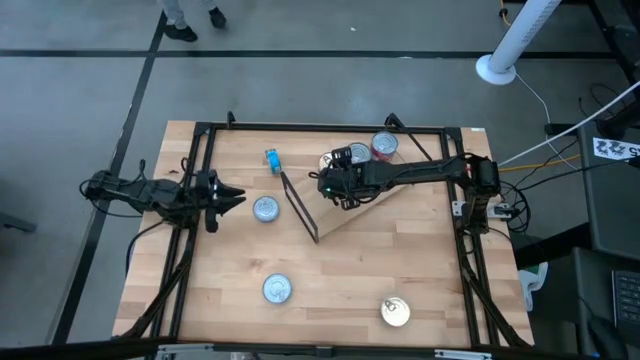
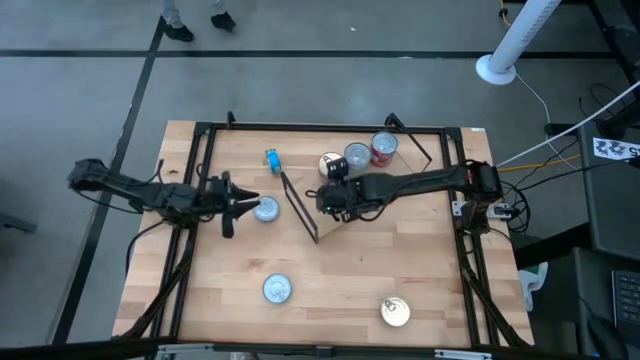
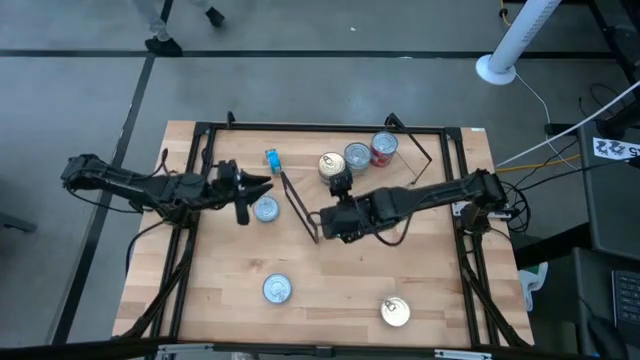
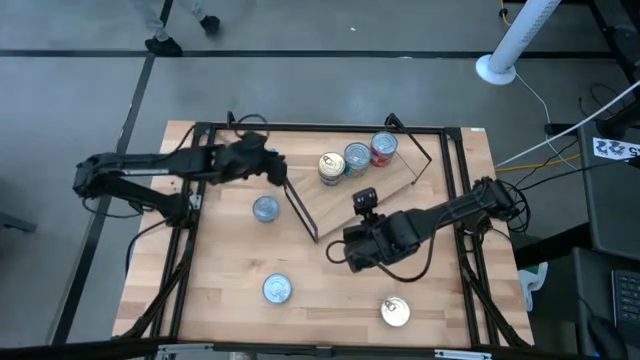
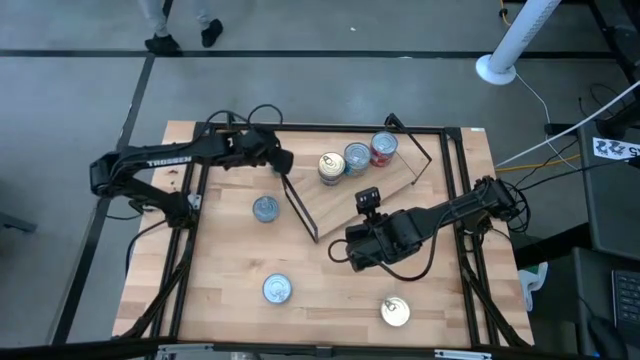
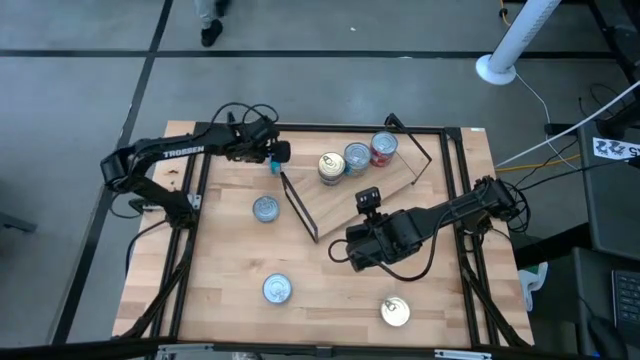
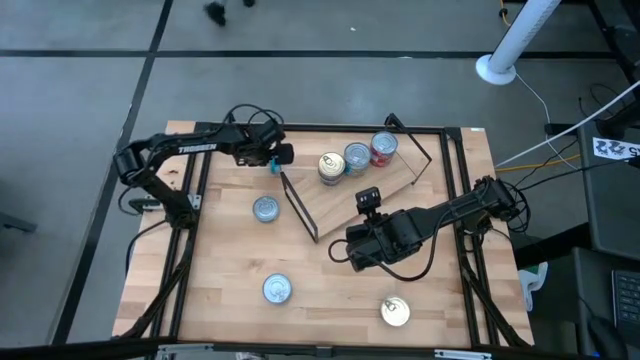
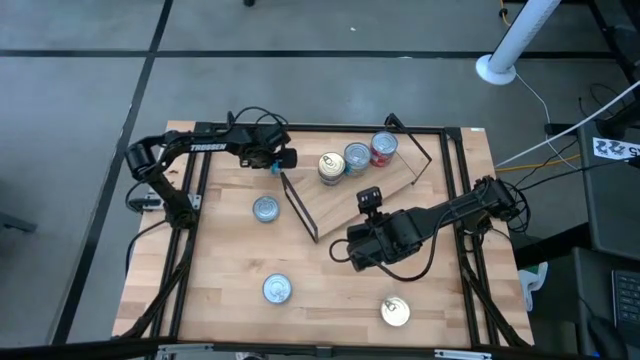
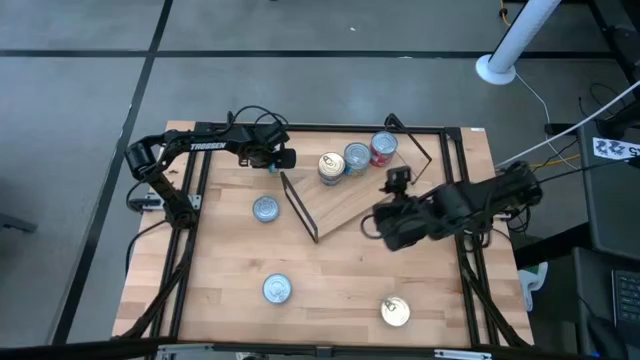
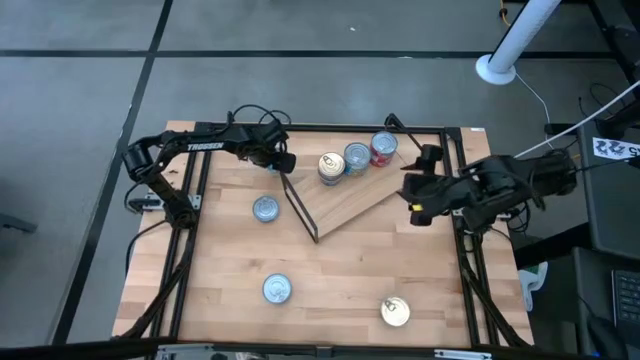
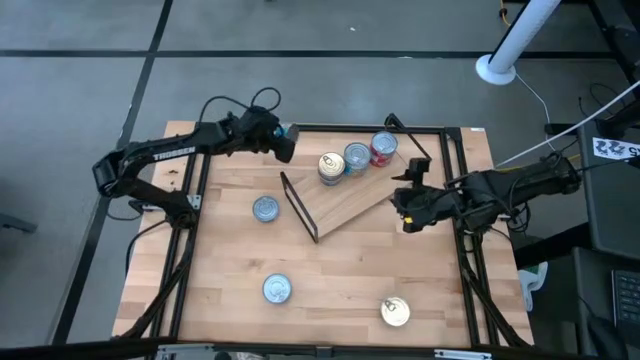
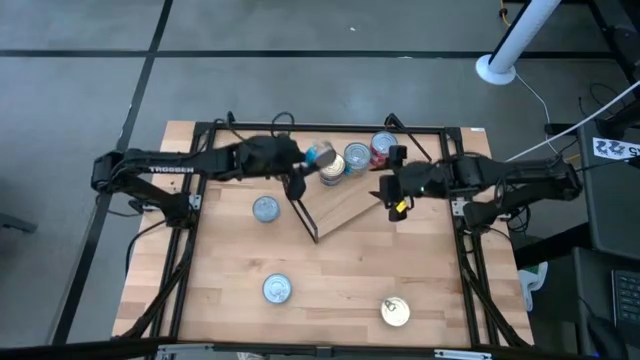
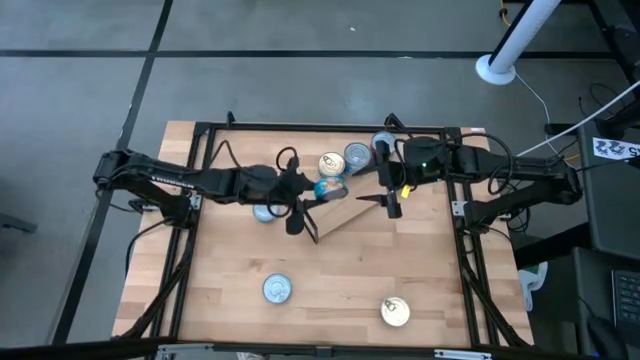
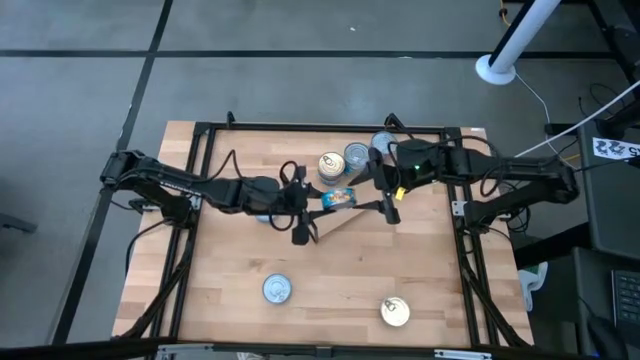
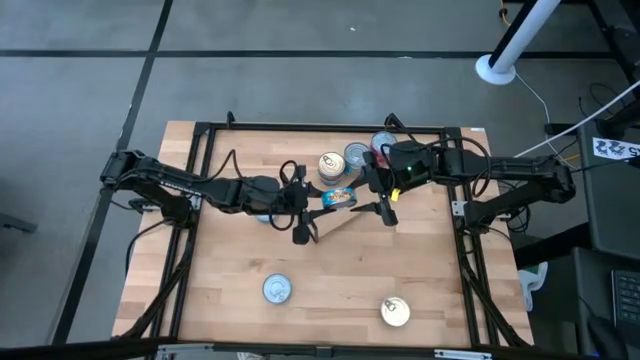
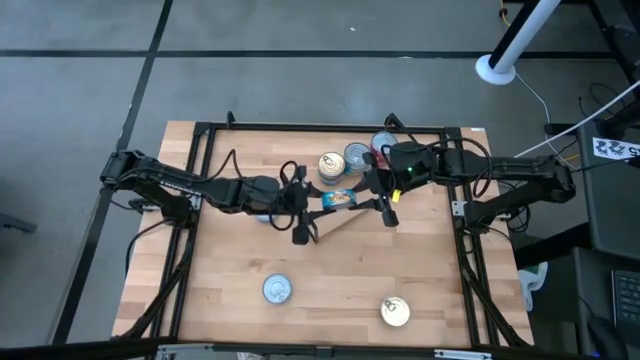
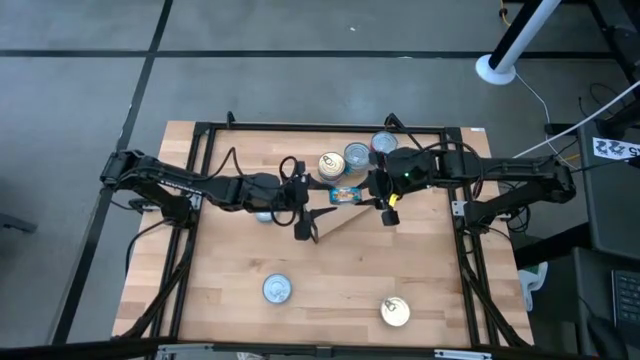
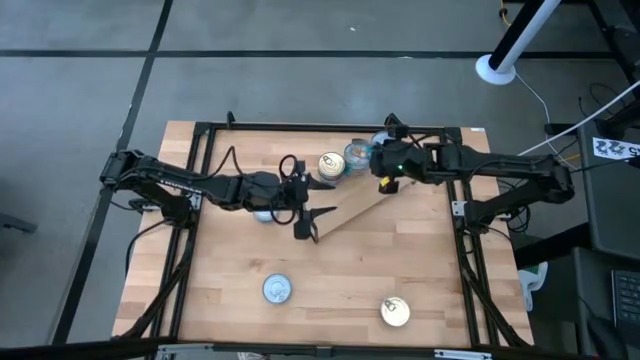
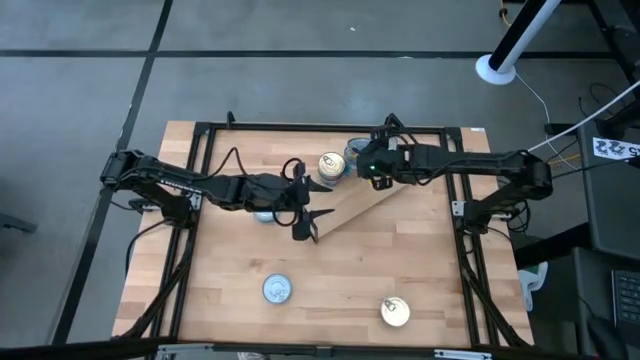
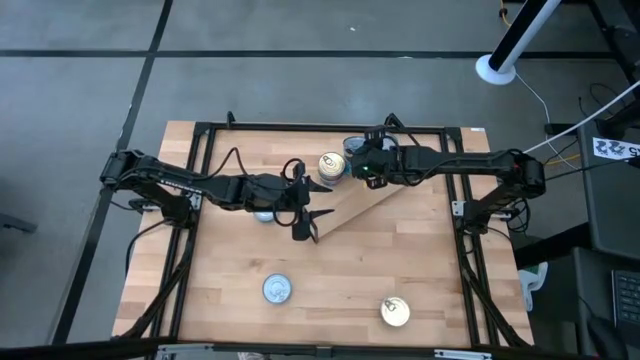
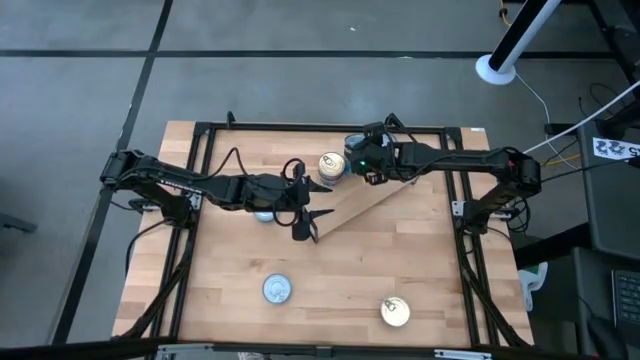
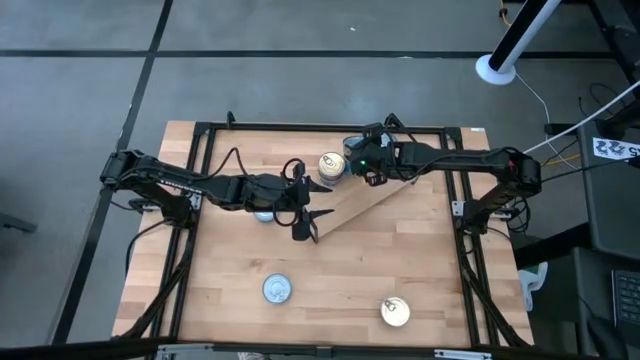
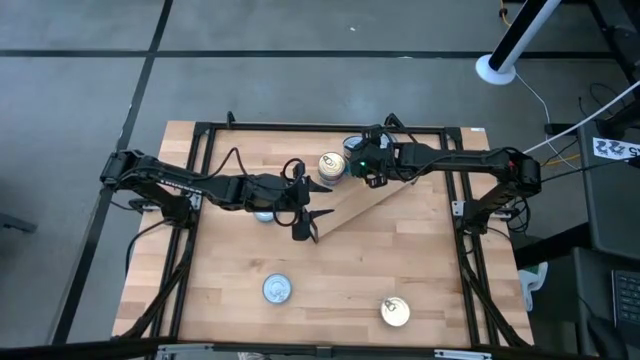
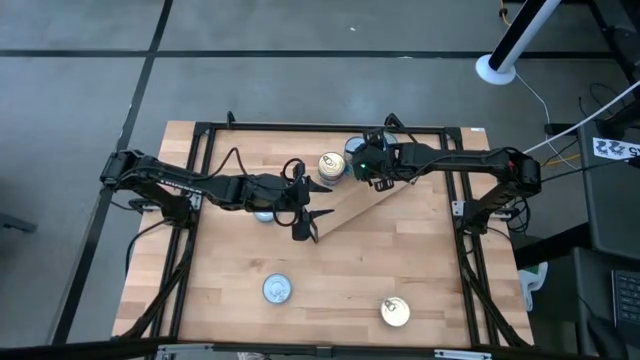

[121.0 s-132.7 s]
Task: Stack canned seafood by type on shelf
Stack the light blue tuna can on top of the light blue tuna can on the shelf

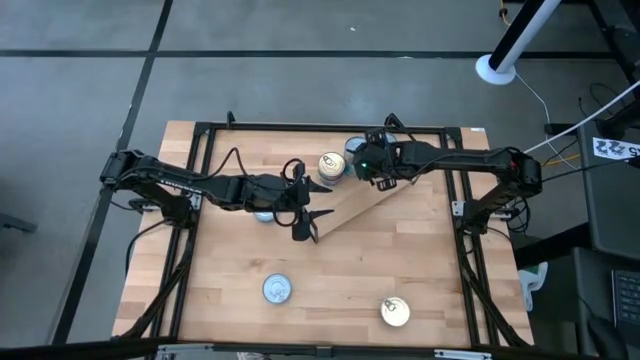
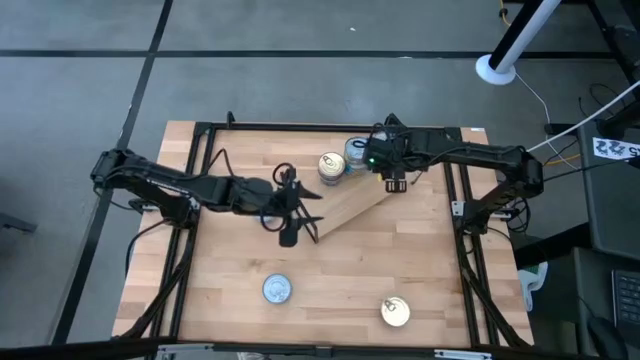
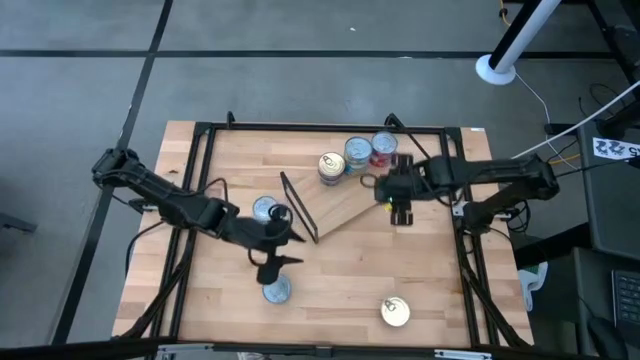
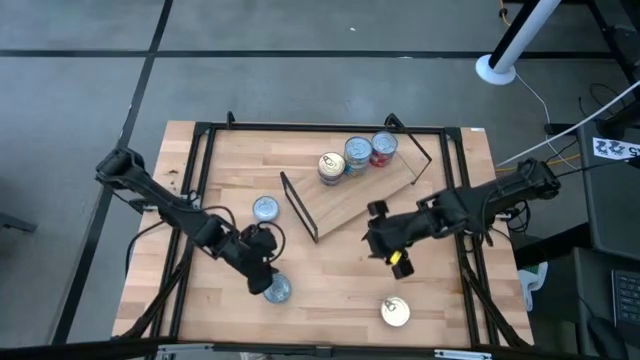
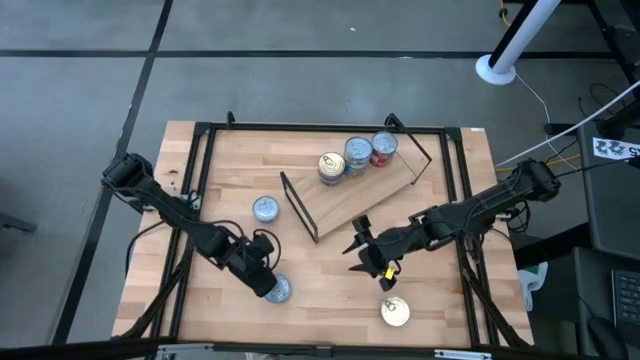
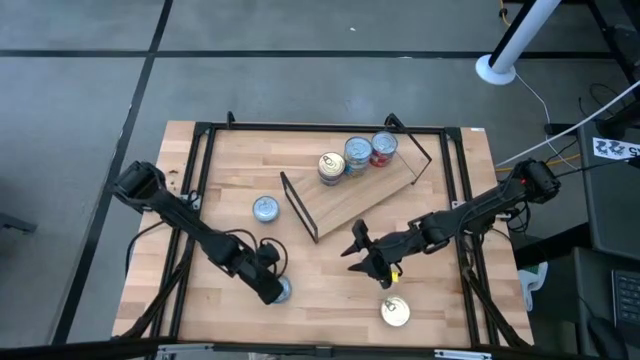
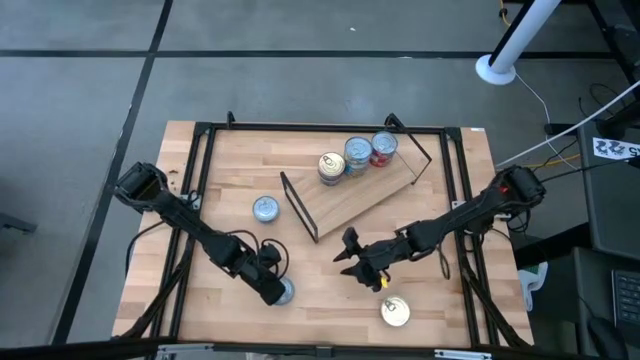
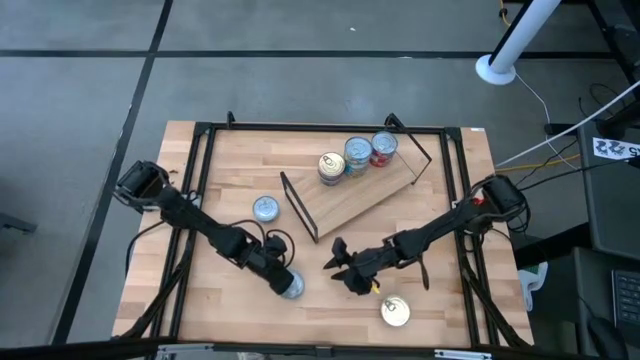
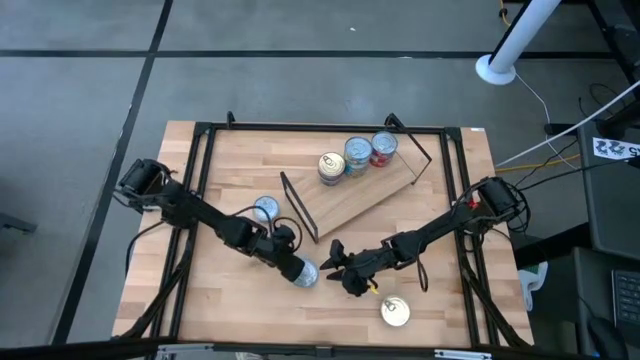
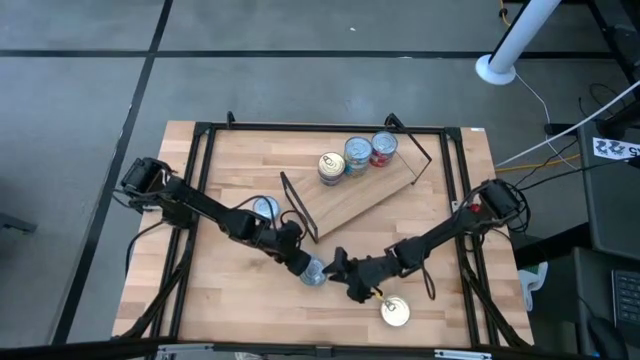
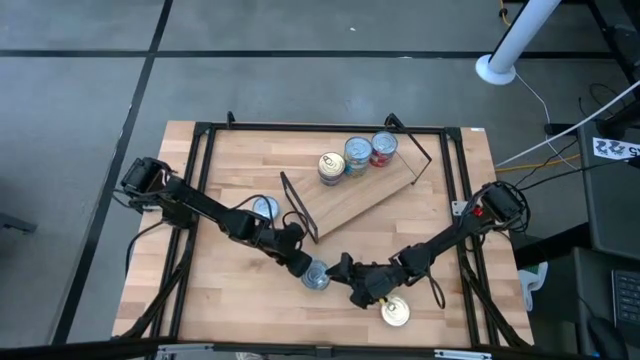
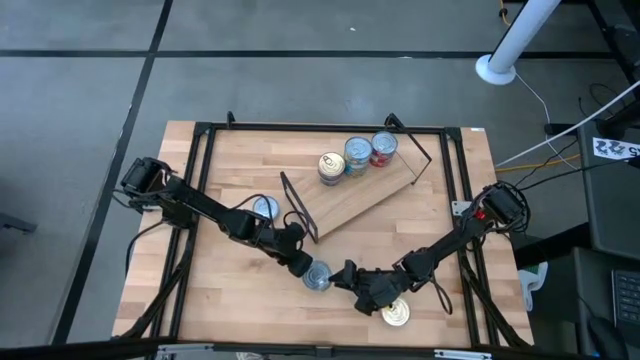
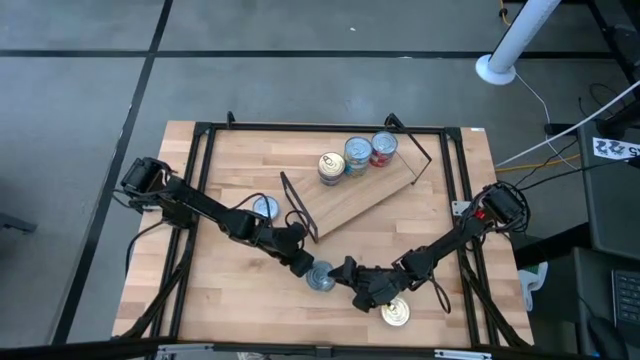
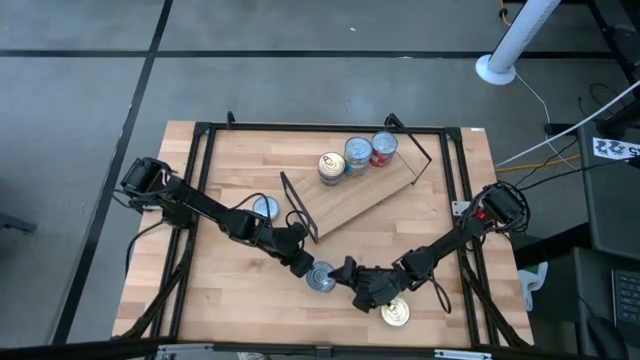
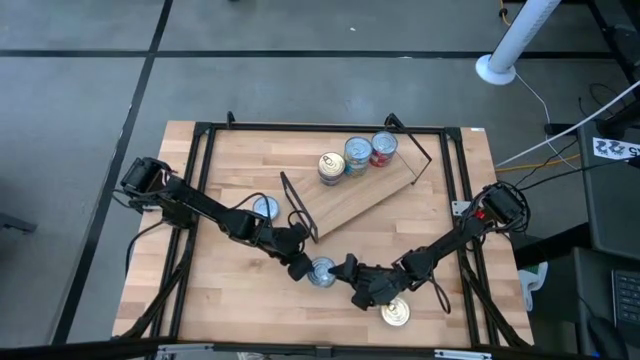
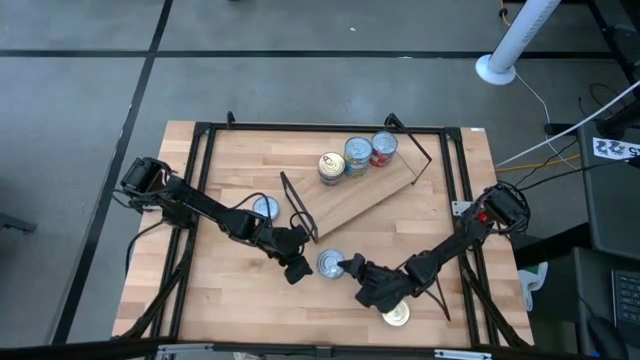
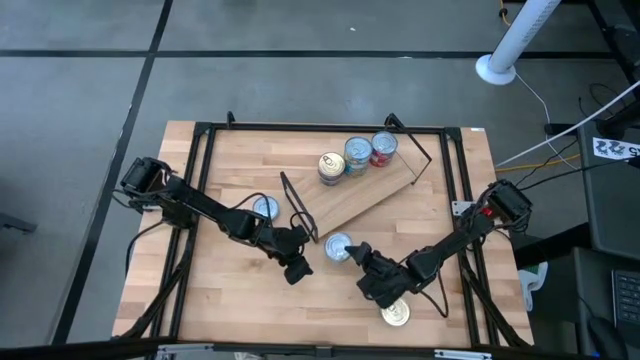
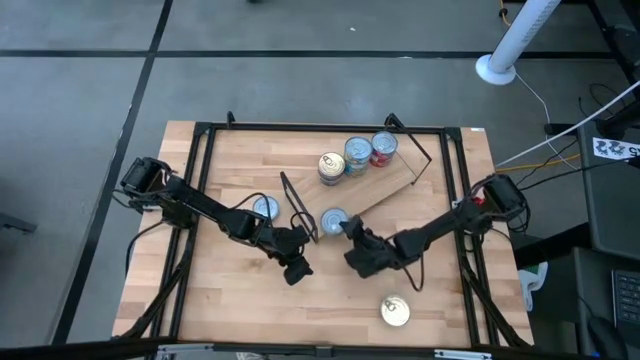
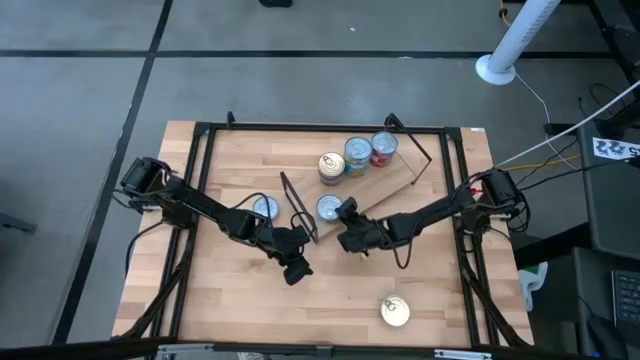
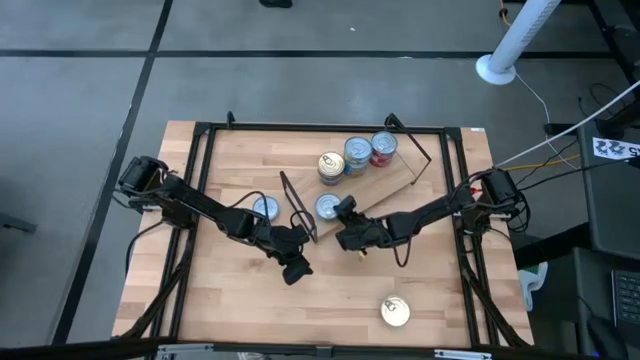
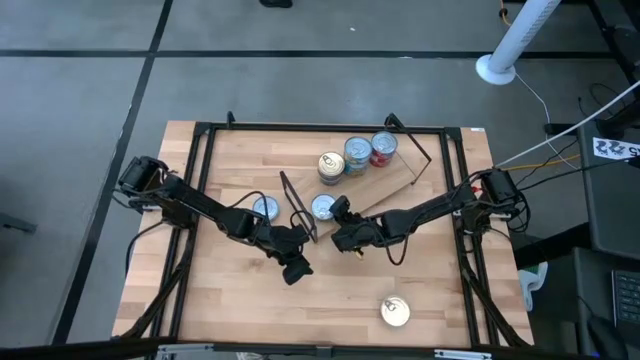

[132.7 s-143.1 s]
Put the bottom green tuna can on the shelf
